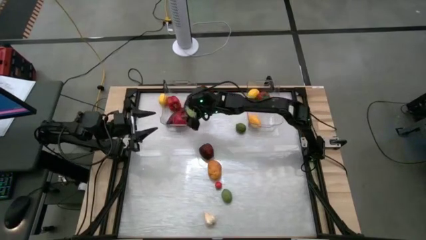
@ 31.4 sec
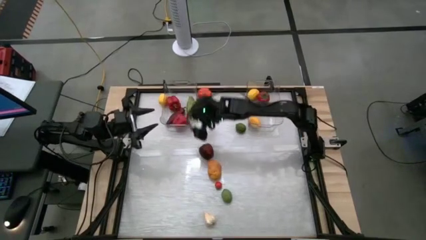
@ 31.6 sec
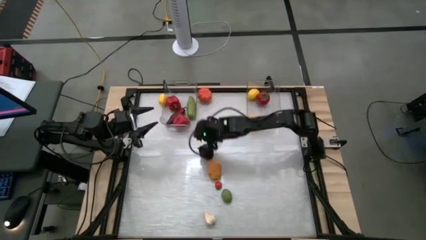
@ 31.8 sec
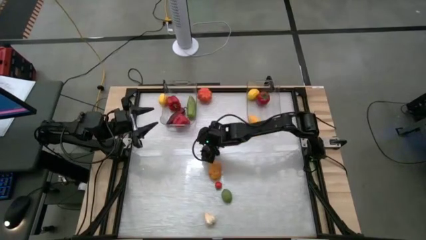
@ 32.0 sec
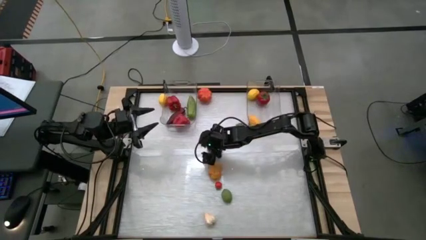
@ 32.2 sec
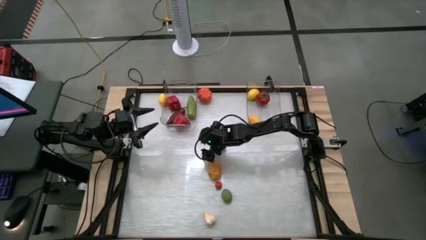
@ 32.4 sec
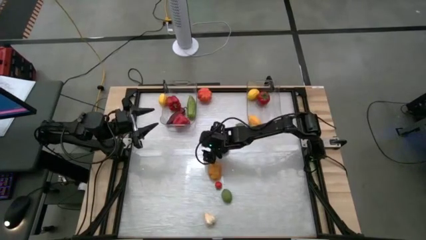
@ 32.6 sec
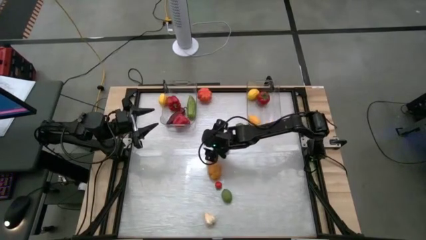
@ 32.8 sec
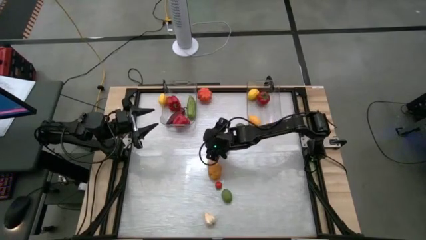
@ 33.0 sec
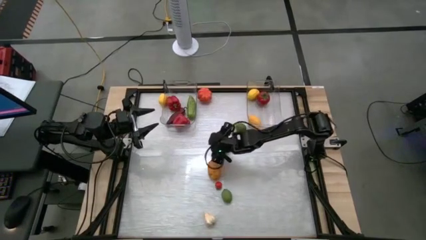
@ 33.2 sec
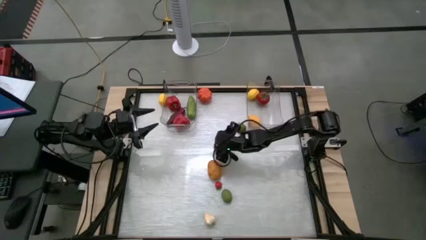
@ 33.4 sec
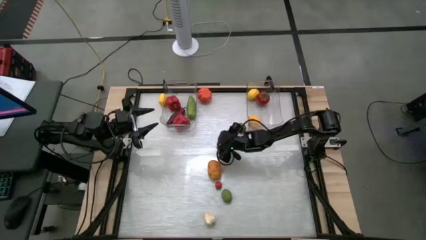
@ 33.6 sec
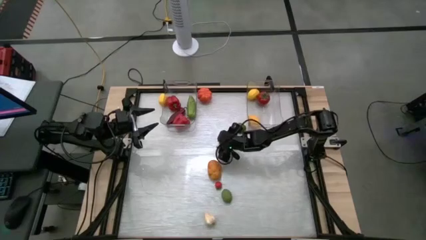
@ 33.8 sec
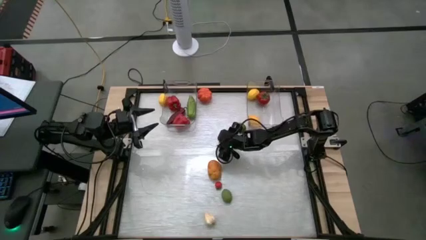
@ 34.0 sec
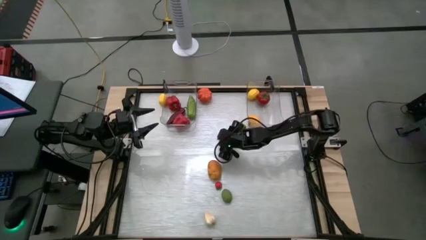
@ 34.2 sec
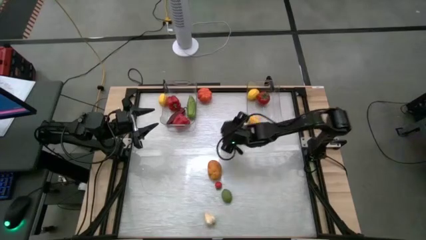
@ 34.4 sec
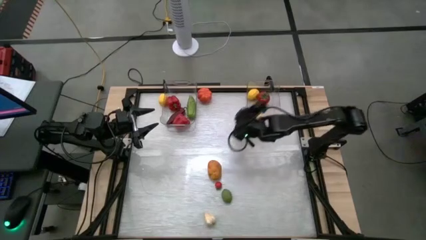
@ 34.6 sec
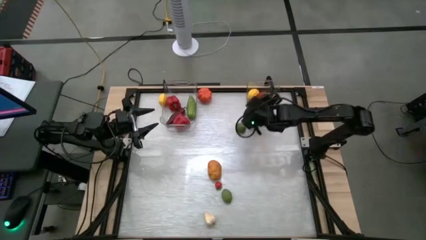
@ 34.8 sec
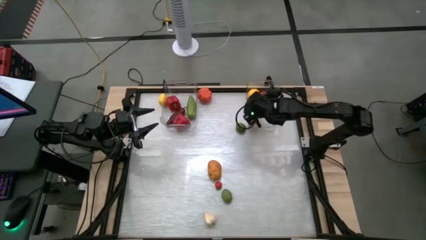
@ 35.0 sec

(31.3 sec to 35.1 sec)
Task: Sort produce into baskets
Put the apple into the right transparent bin

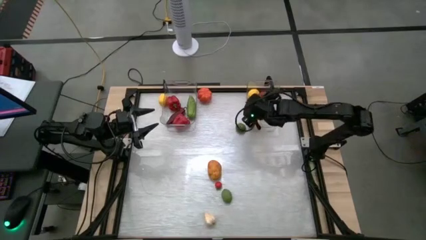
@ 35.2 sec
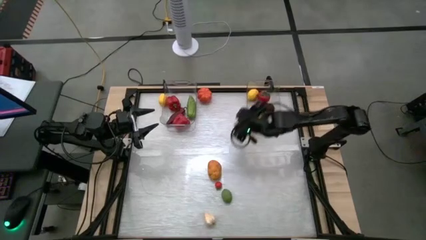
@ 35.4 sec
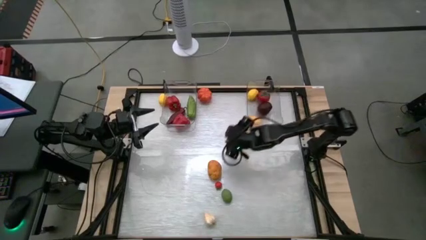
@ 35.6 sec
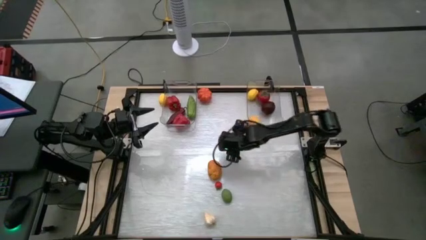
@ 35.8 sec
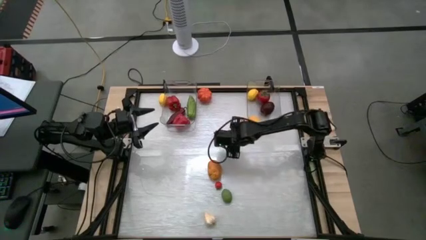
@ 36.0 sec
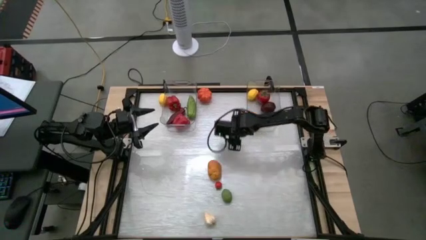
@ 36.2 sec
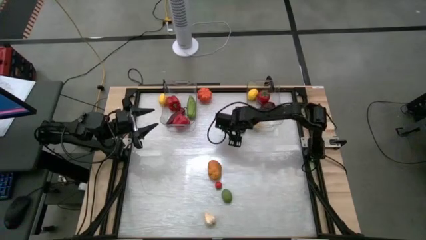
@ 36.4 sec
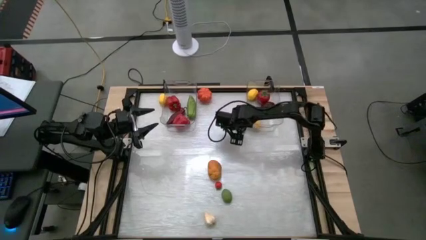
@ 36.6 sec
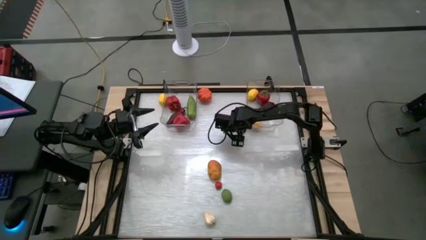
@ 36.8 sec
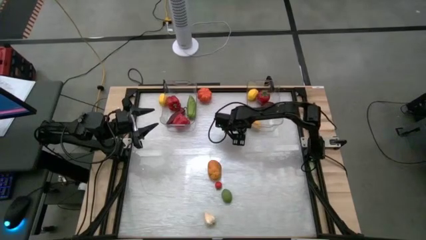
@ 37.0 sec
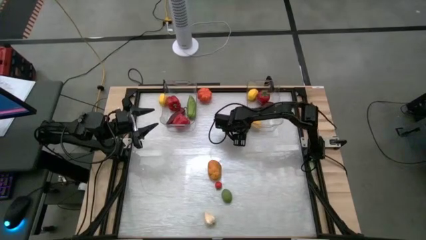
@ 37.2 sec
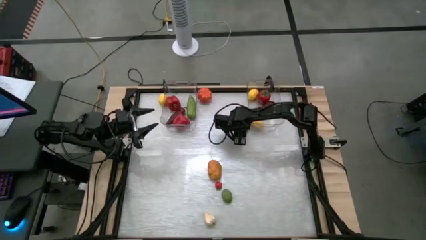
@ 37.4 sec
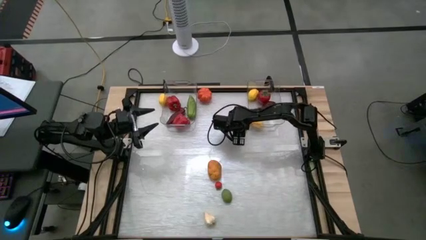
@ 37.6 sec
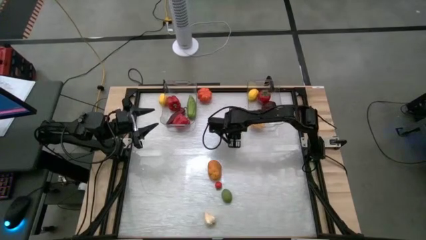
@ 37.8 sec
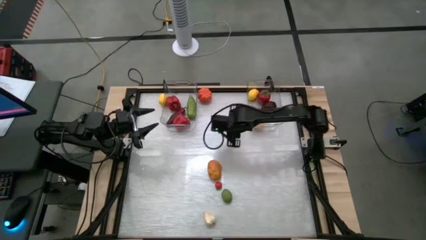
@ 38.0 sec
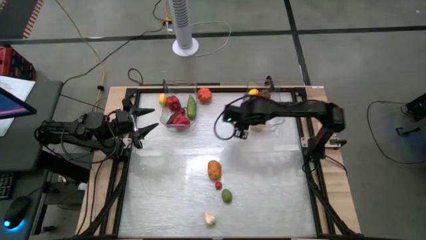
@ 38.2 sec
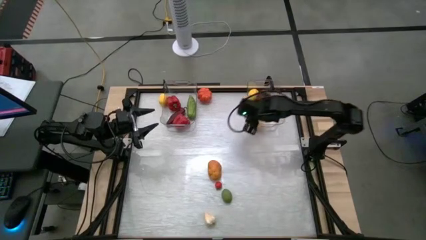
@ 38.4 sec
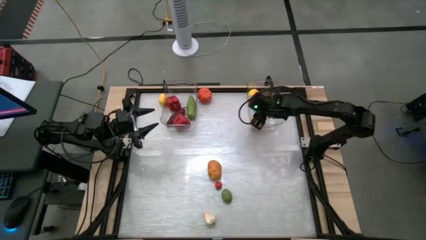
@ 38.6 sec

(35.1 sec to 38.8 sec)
Put the top lime into the top right transparent bin

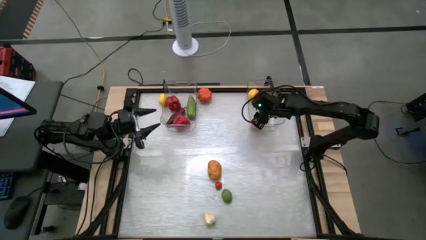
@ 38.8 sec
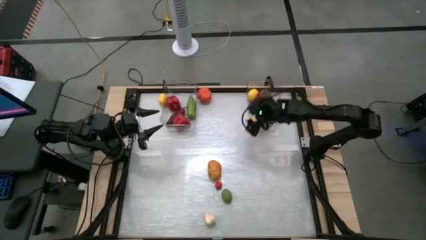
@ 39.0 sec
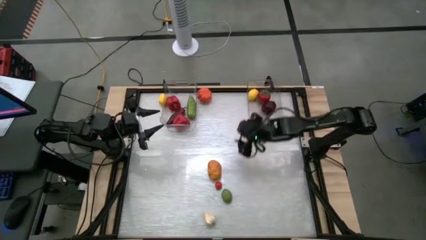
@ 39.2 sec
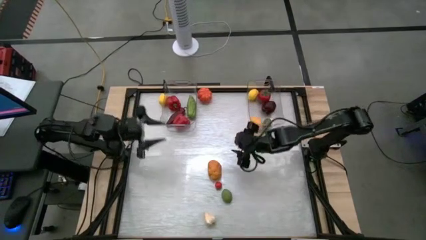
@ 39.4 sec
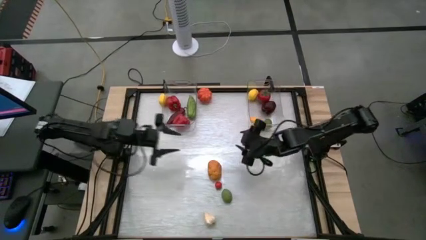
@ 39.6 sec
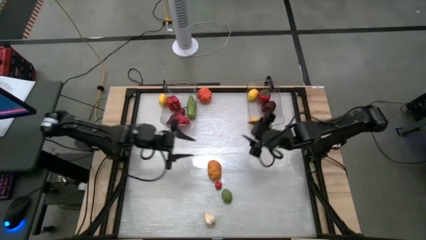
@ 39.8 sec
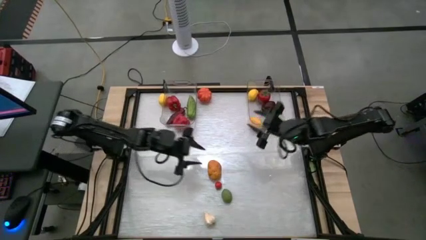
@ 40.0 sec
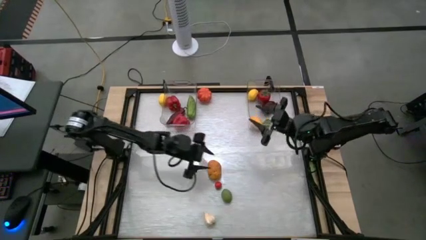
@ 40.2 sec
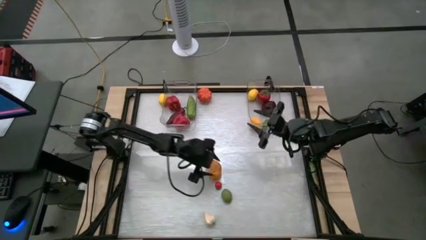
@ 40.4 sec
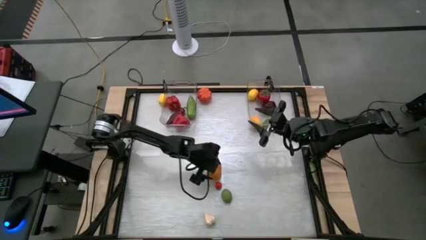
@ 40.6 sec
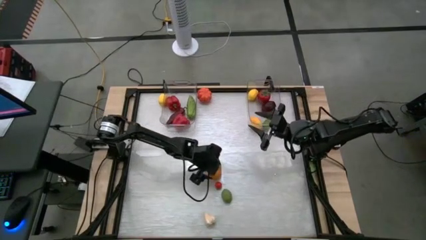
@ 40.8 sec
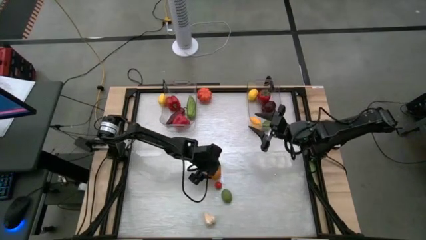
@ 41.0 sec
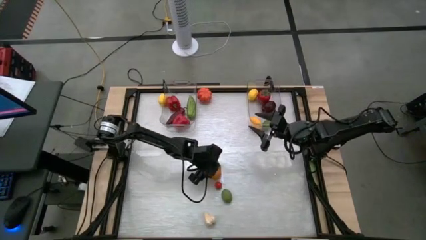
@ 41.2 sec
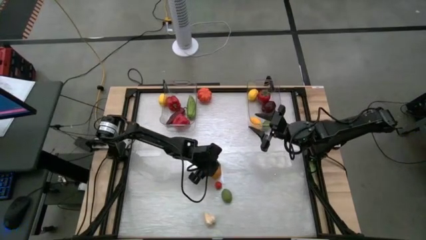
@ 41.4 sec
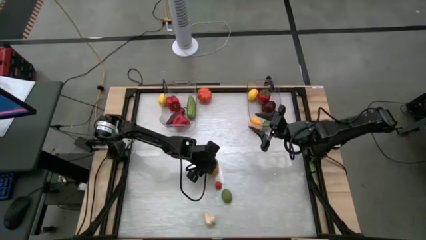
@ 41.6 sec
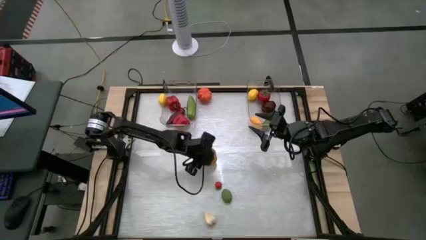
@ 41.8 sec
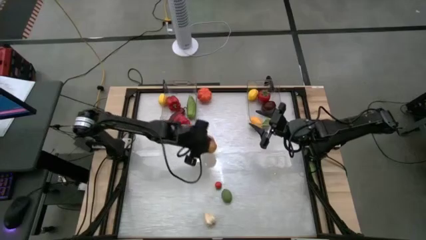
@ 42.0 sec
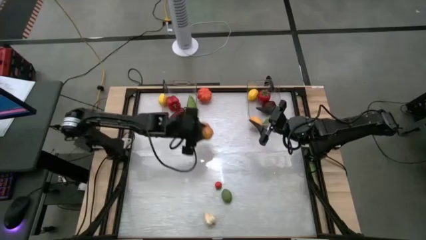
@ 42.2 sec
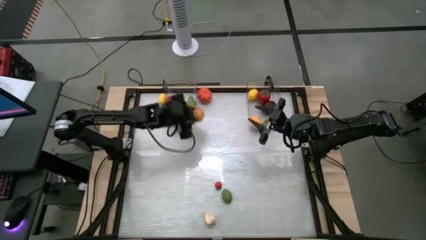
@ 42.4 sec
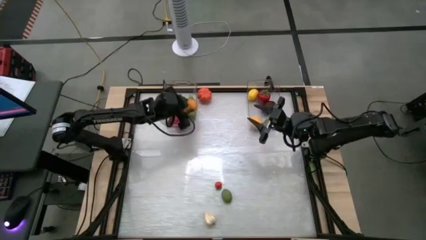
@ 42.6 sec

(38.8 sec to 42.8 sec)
Put the potato into the left transparent bin

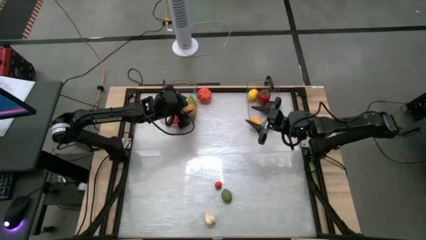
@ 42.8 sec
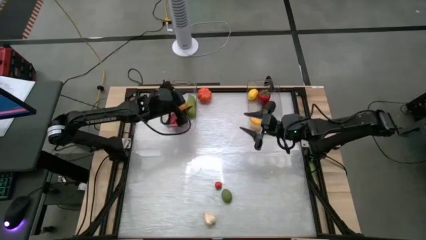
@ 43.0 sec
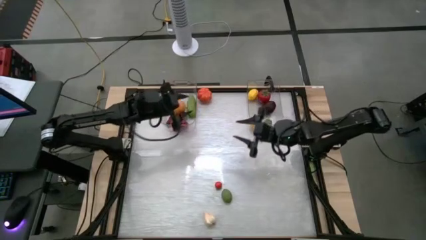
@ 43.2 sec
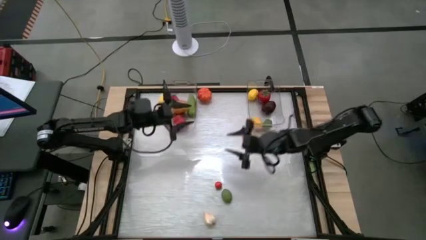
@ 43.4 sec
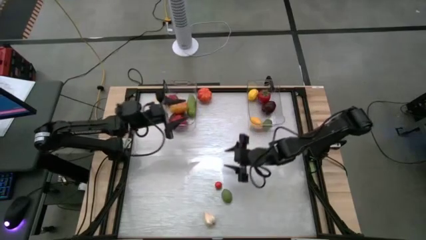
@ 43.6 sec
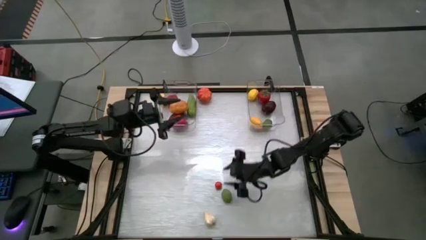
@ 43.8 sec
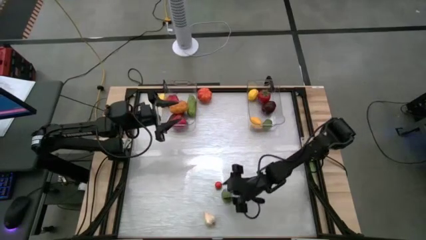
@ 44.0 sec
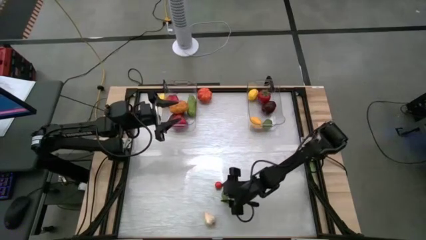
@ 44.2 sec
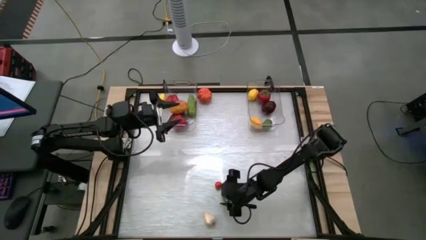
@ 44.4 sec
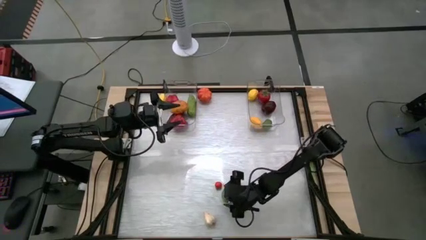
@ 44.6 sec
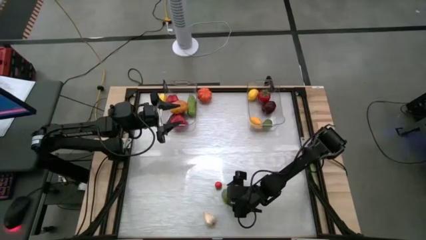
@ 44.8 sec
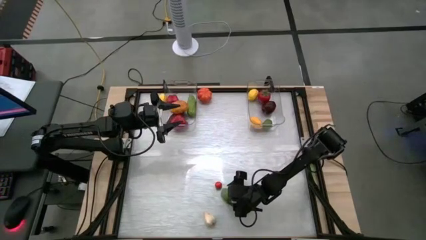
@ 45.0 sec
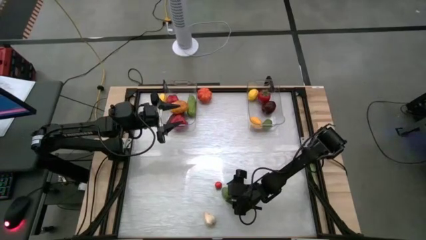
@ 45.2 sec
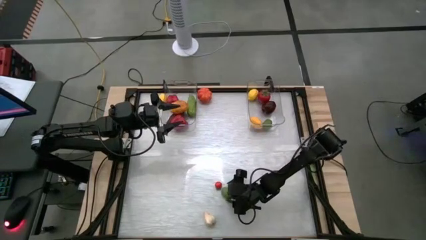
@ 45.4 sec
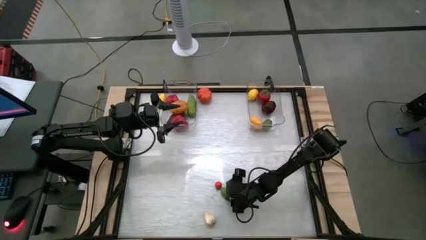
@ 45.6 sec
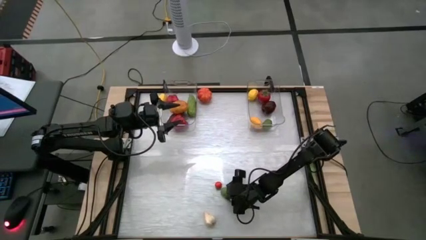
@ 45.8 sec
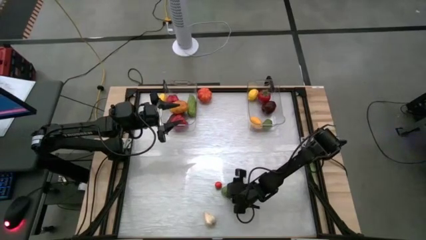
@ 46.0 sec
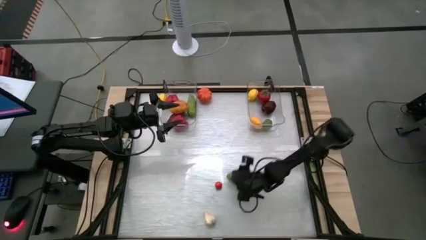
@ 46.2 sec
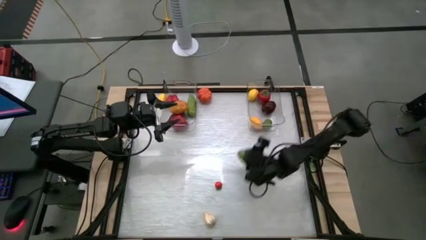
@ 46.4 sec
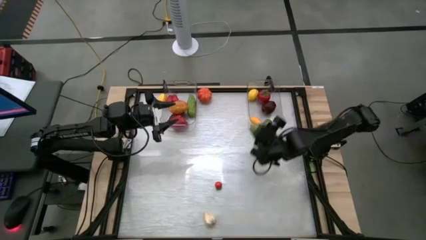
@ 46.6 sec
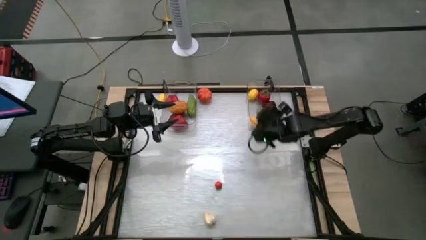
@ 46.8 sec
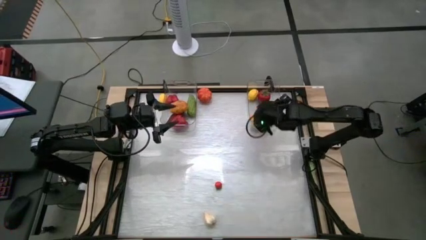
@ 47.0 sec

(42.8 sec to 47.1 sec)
Put the lime into the right transparent bin

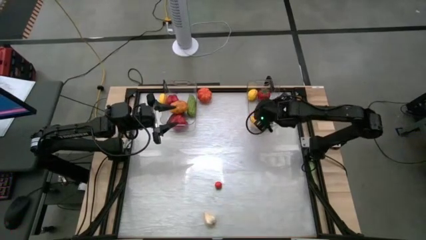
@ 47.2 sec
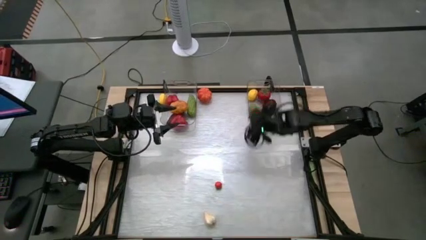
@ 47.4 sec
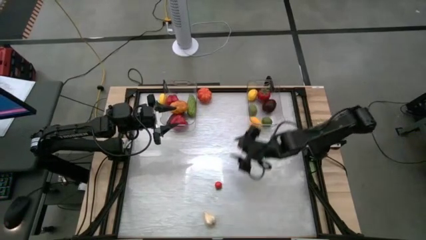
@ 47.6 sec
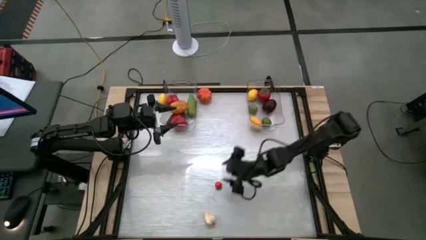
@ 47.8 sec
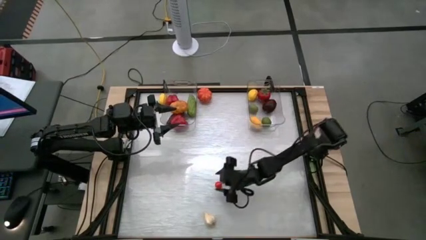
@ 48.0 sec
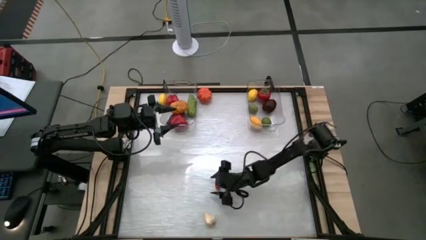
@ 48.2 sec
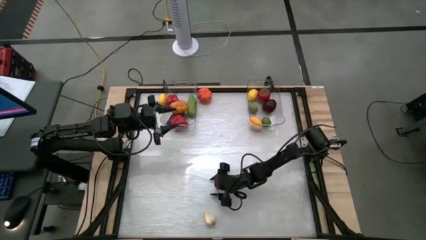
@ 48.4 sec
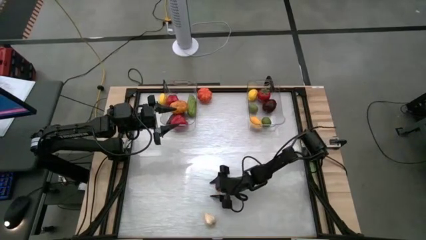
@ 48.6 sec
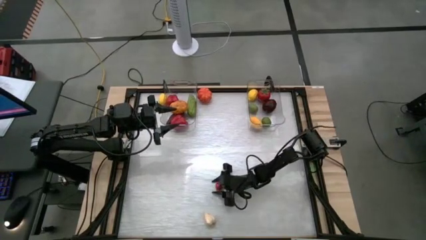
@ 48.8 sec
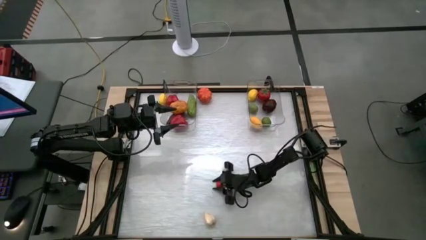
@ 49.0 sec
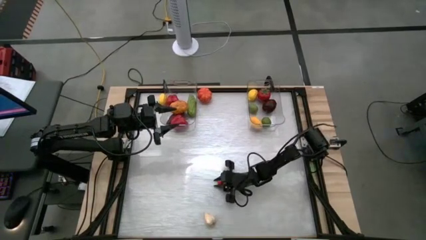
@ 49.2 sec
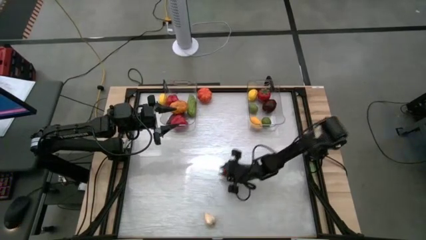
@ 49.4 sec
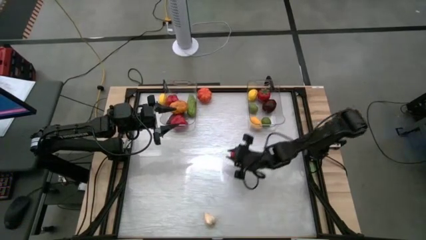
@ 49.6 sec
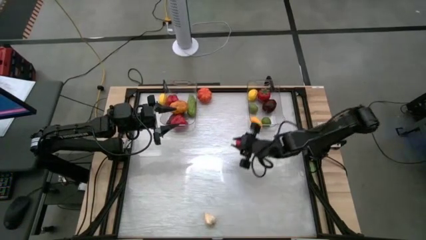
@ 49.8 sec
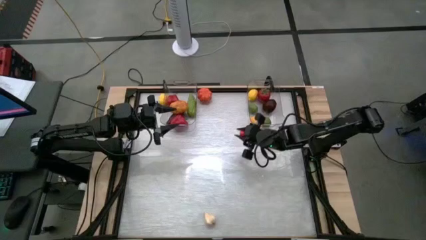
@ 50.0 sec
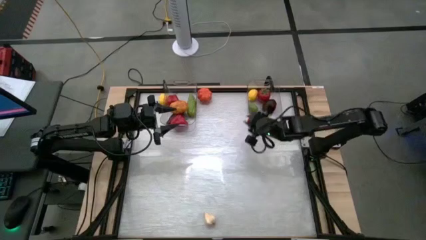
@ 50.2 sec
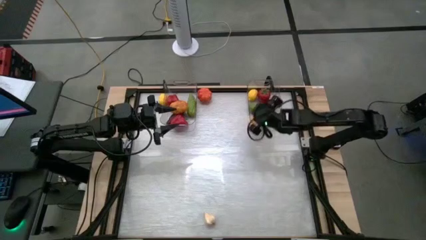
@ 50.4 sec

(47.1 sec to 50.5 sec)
Put the small tomato into the right transparent bin
